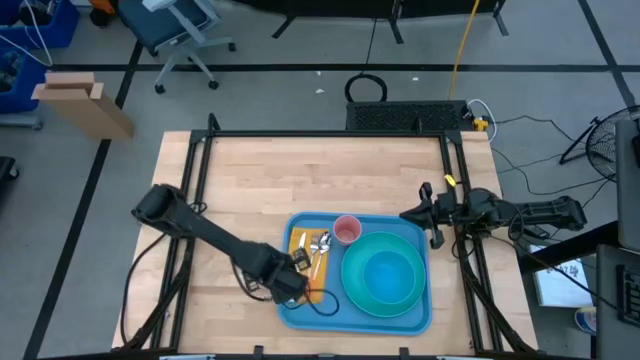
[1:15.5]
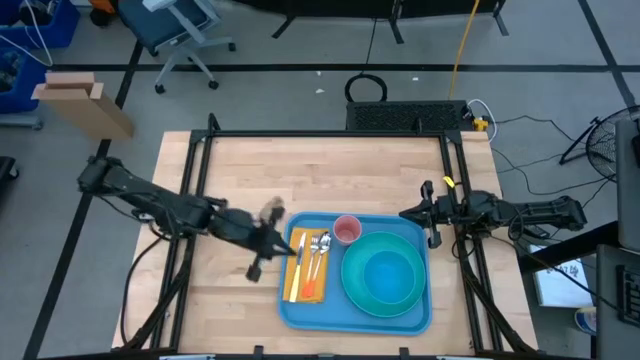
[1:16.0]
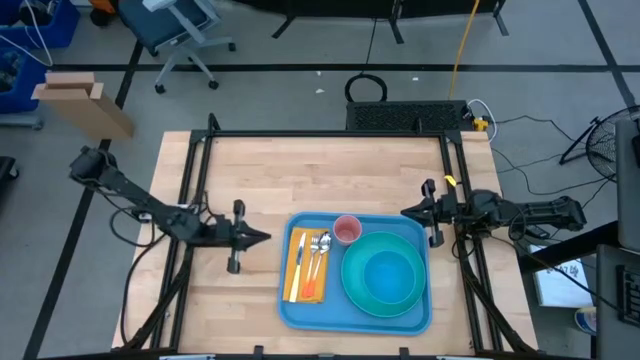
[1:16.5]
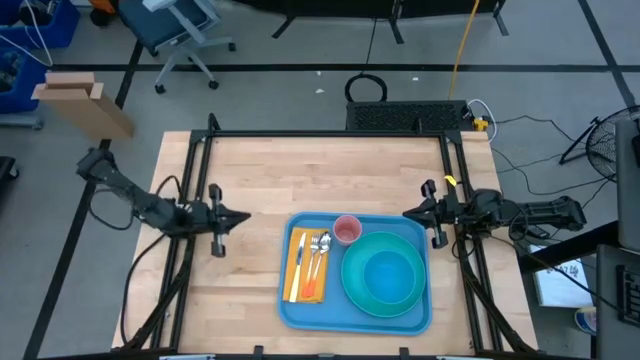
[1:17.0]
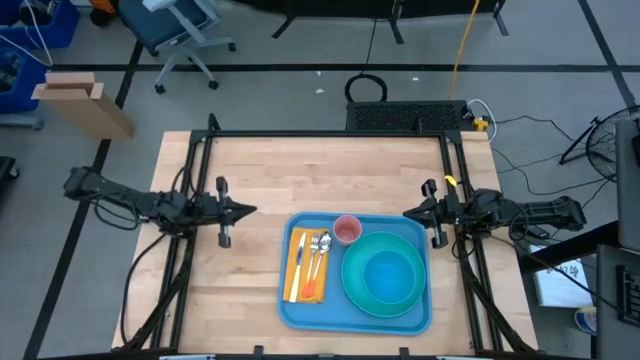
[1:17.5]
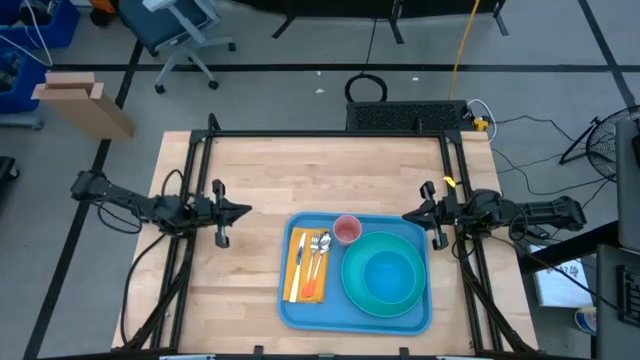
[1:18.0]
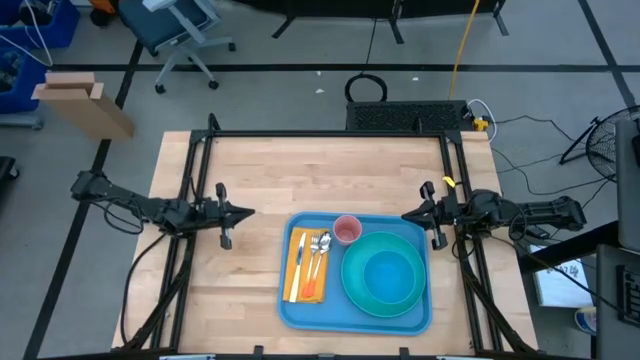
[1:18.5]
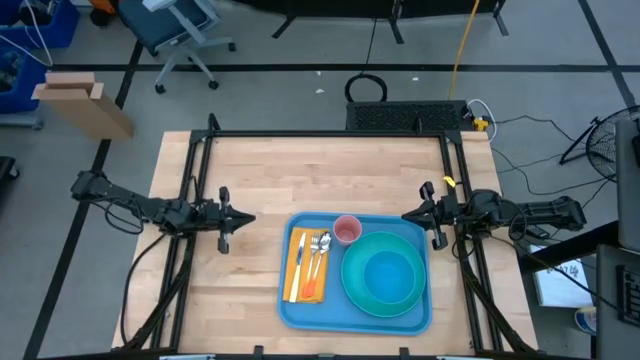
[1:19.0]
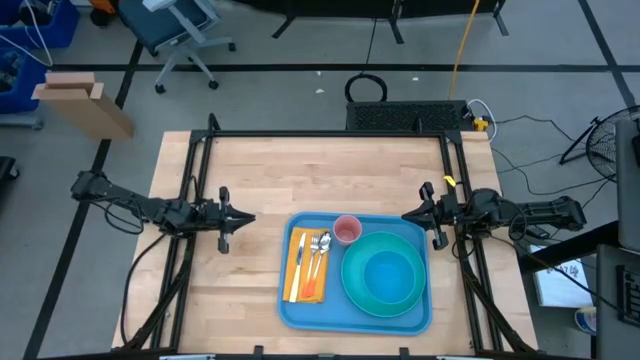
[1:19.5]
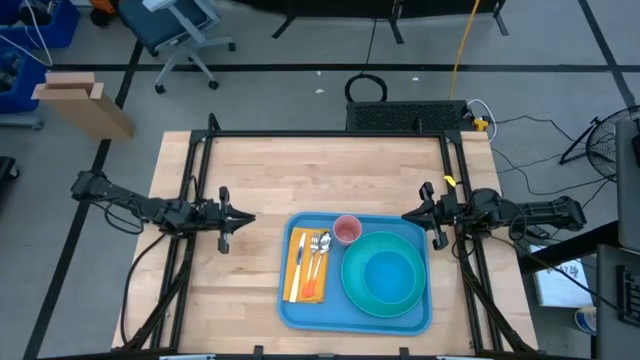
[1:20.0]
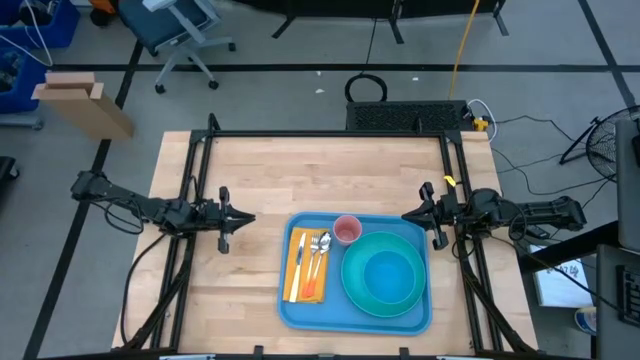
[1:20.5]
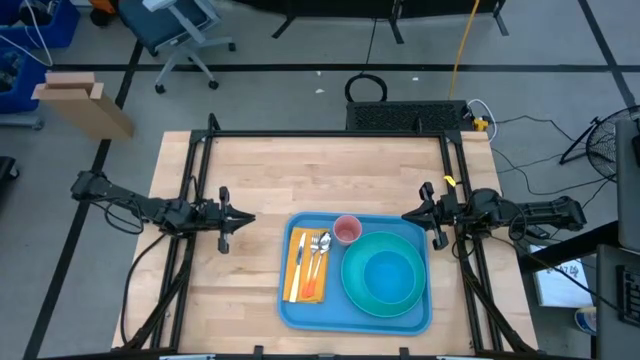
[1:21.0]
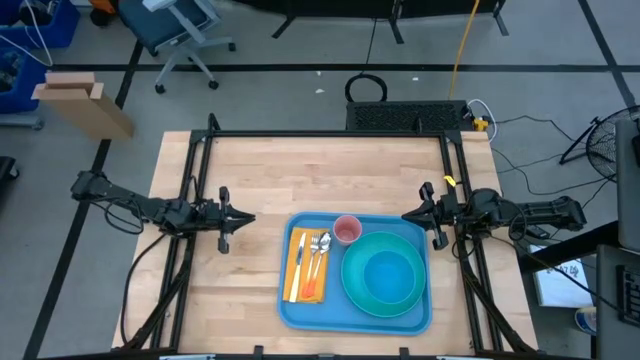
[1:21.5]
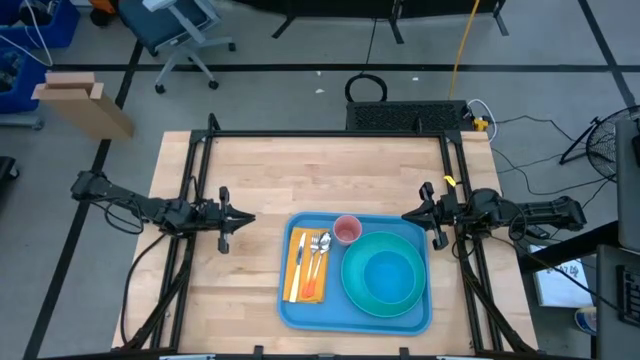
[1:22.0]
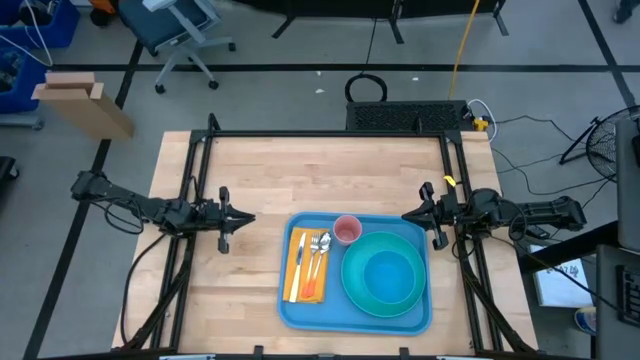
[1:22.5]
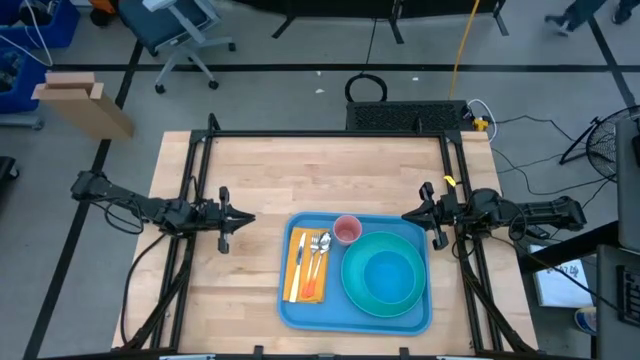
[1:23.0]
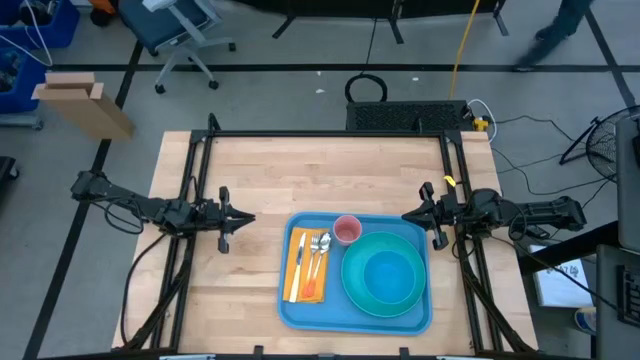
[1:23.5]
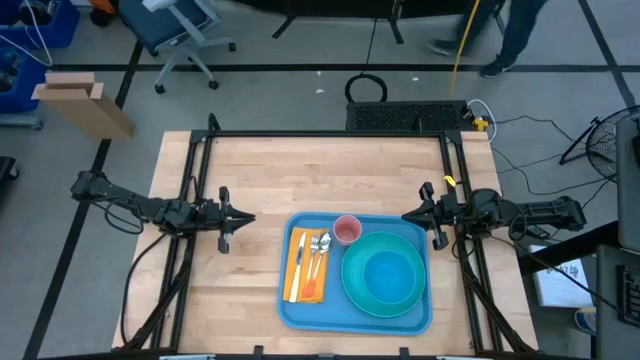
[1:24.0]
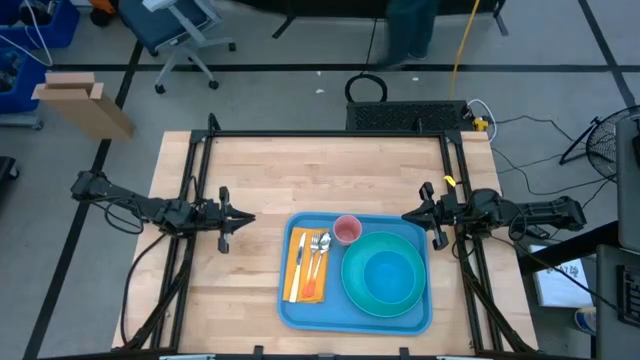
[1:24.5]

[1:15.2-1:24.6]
Task: Set up tray
Return to Home Position

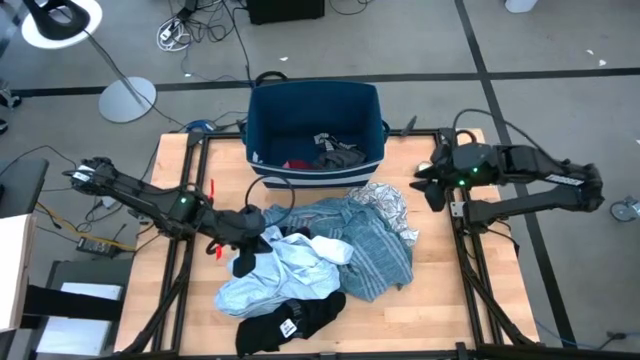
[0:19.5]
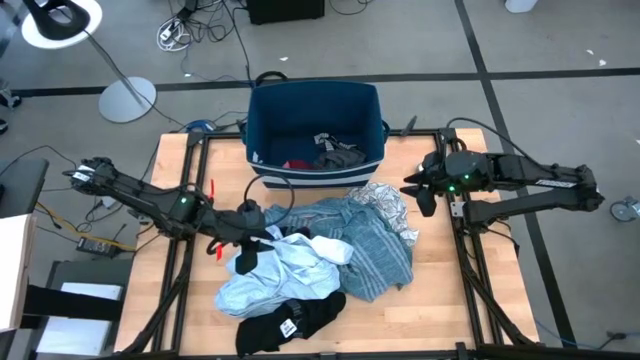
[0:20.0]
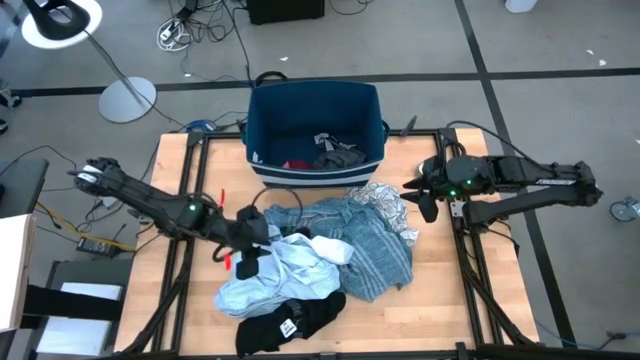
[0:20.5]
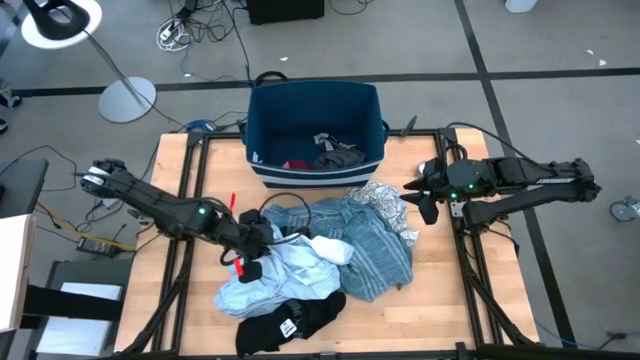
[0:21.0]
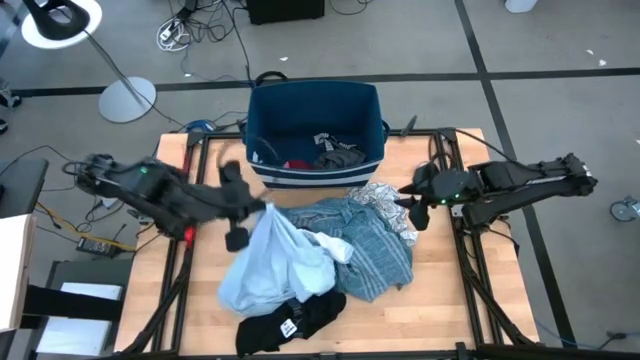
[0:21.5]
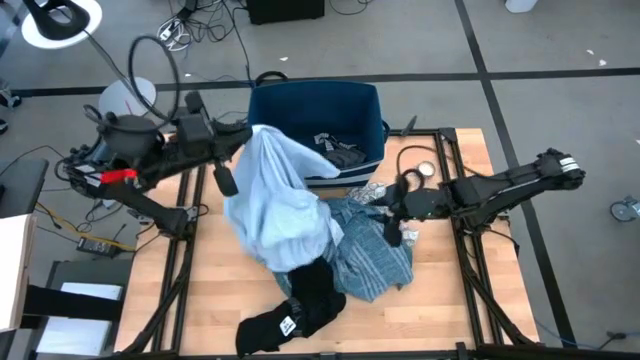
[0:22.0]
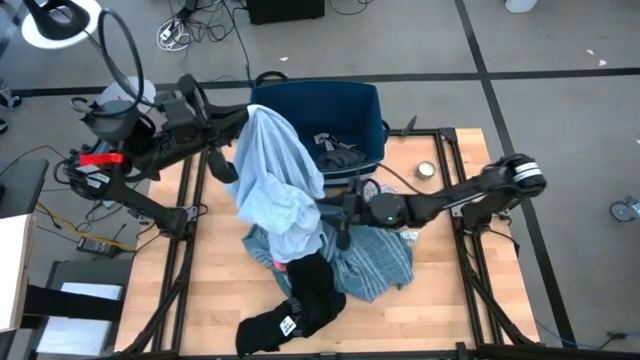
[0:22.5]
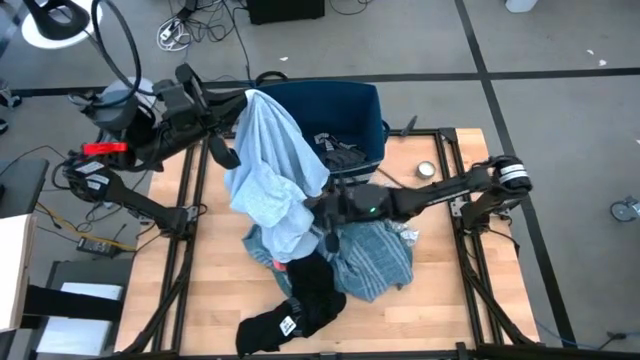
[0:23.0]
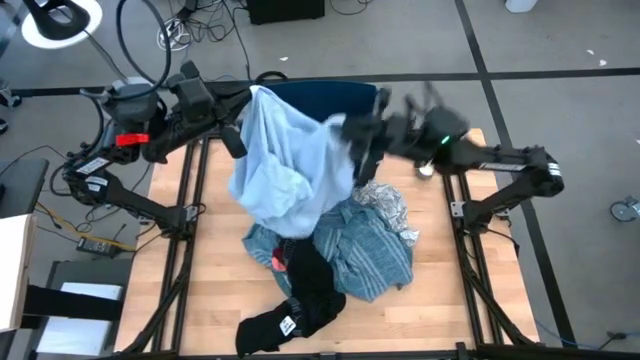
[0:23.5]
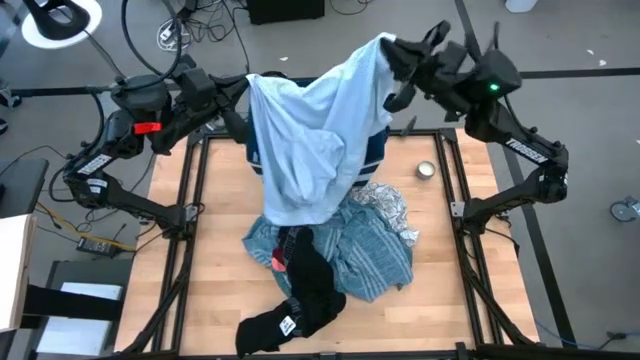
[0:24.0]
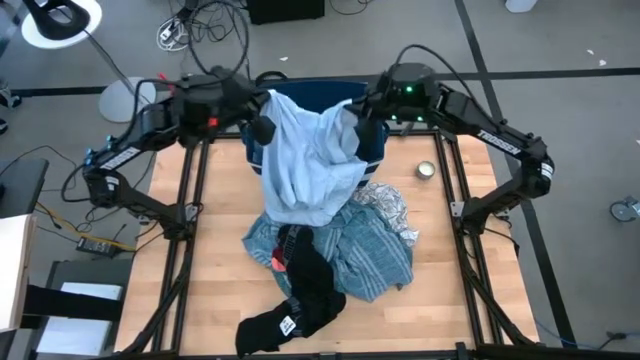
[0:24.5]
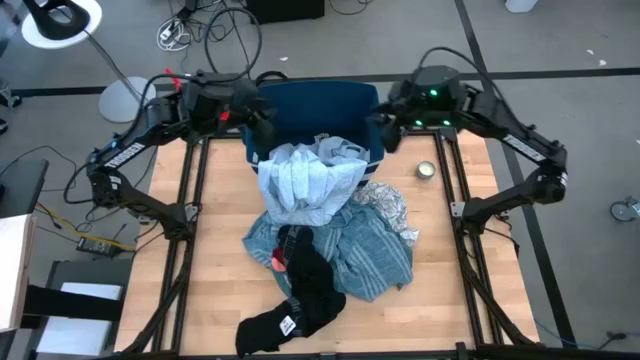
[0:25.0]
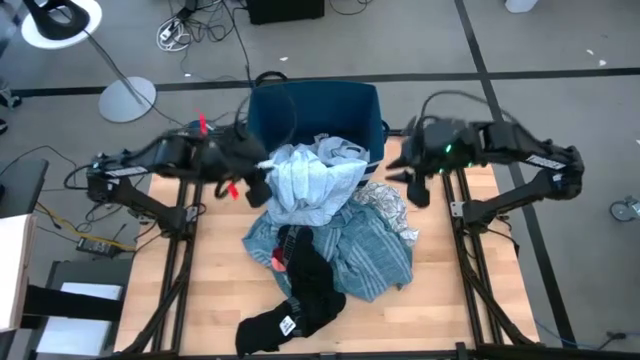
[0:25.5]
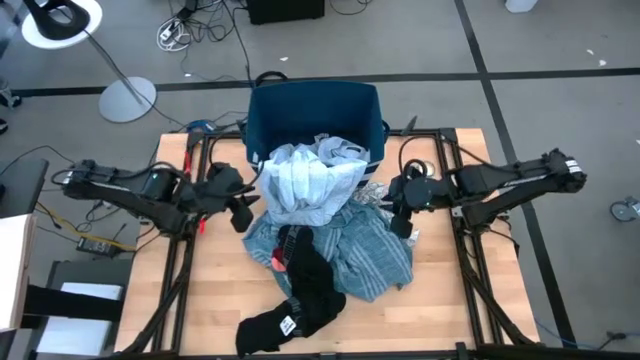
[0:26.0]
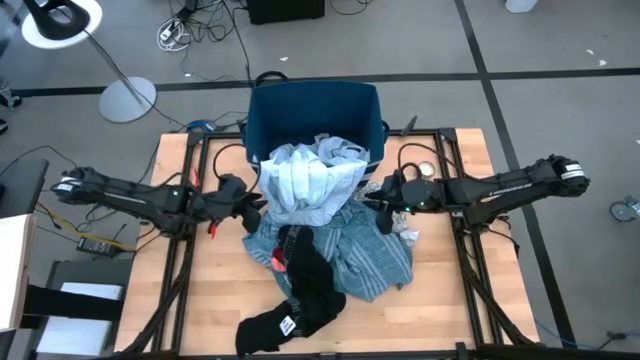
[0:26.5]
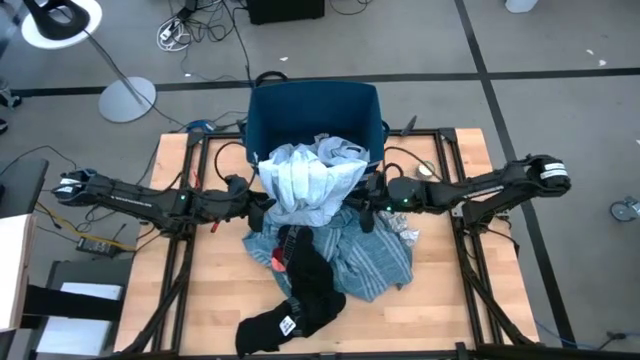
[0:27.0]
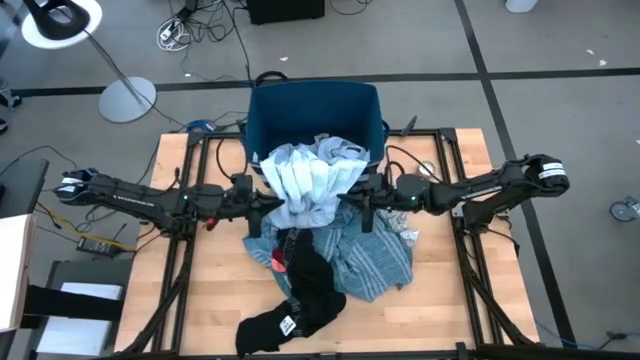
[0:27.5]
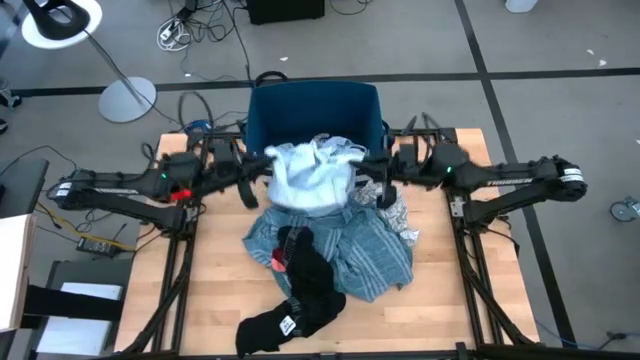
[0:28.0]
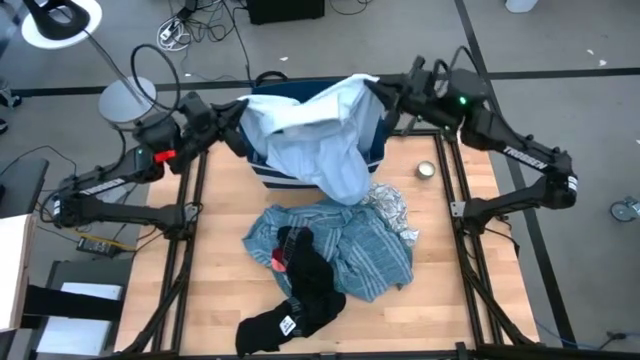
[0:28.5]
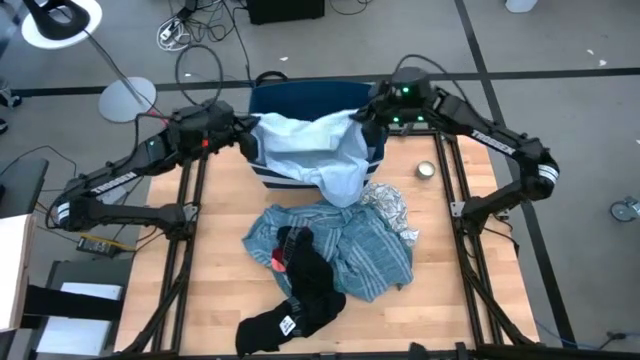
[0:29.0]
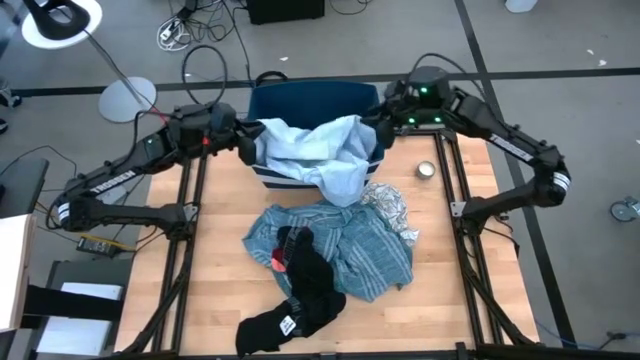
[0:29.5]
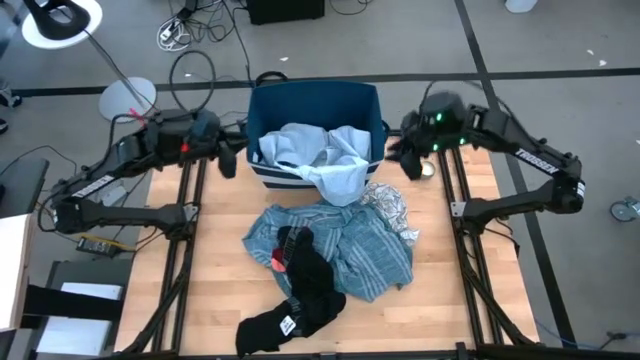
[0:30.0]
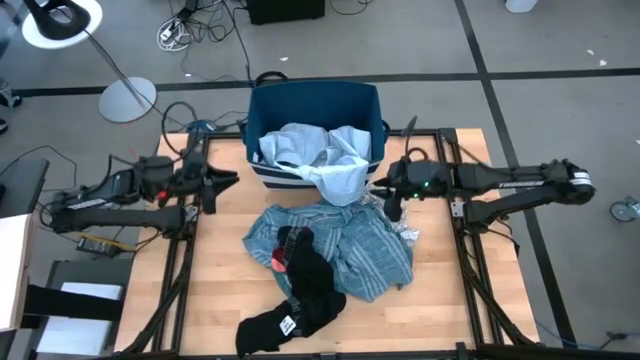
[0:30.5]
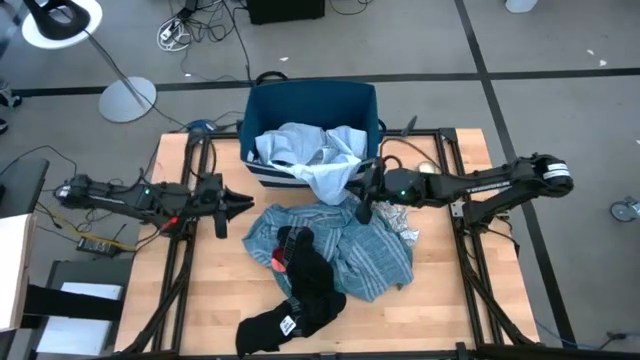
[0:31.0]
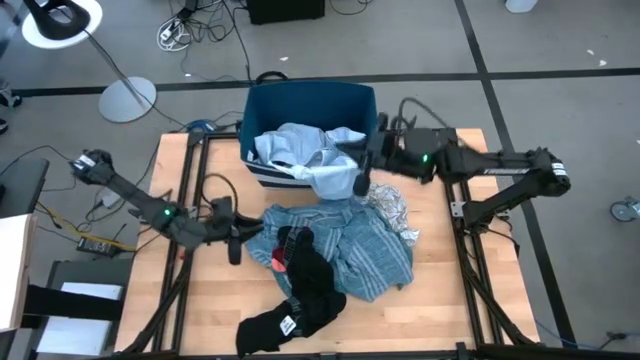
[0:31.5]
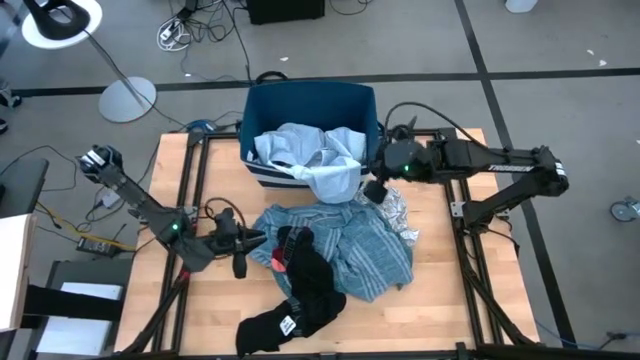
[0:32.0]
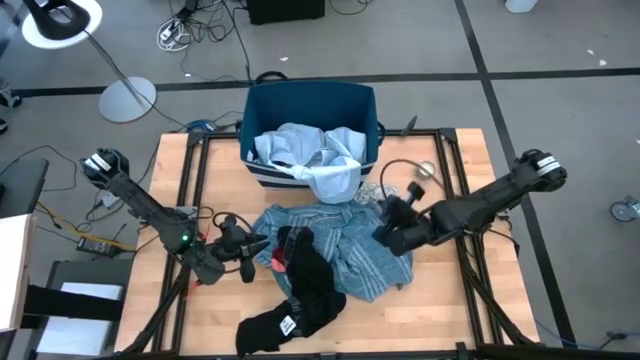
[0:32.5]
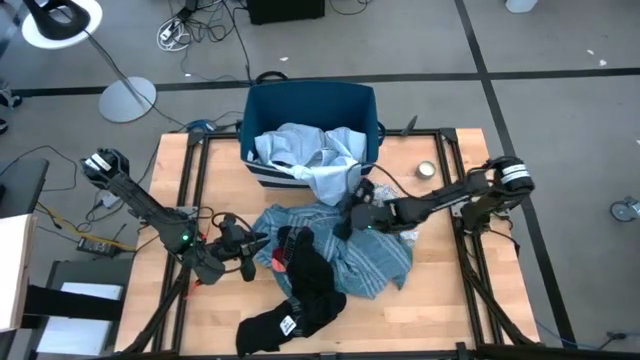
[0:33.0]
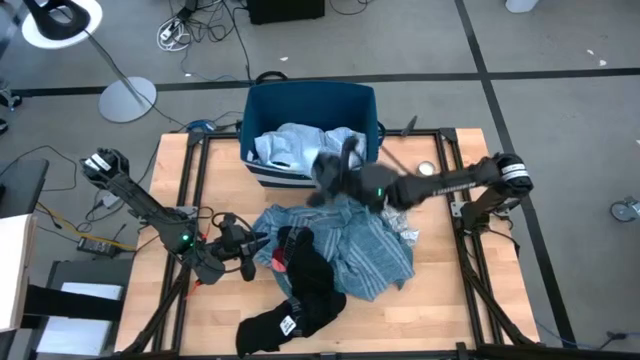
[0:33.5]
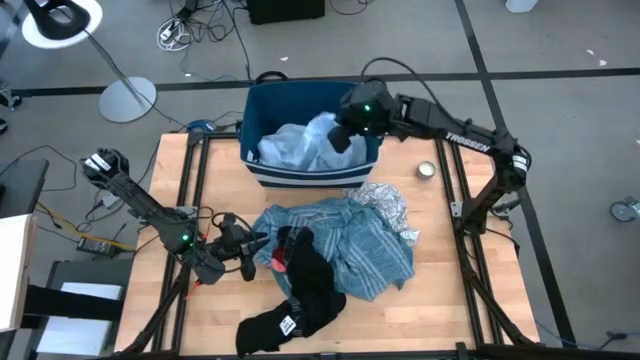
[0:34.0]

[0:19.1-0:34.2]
Task: Sort clothes
Put the light blue shirt into the blue laundry organizer
